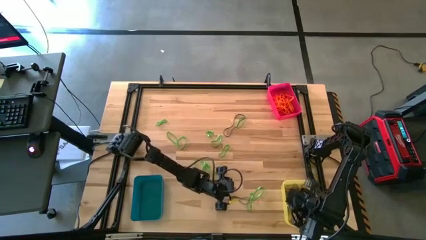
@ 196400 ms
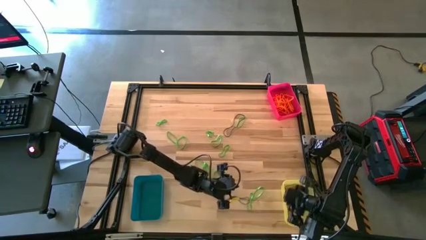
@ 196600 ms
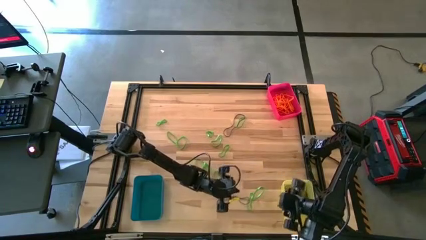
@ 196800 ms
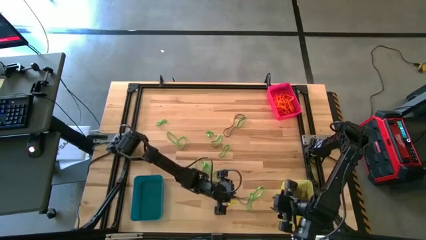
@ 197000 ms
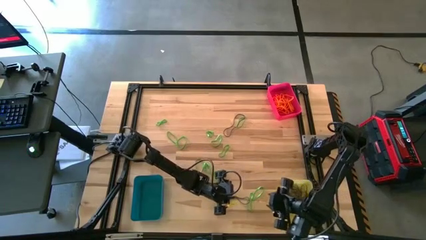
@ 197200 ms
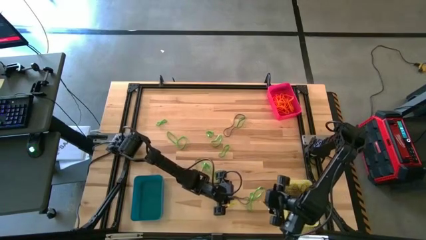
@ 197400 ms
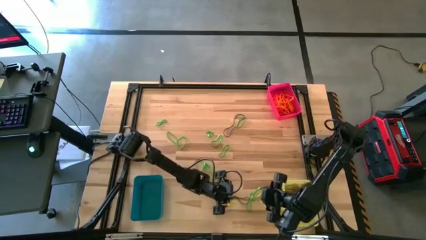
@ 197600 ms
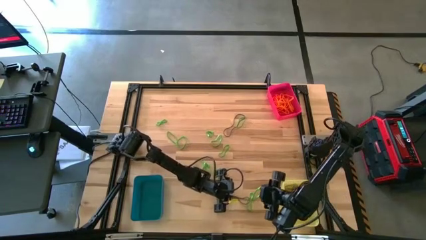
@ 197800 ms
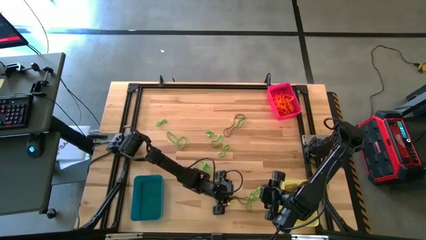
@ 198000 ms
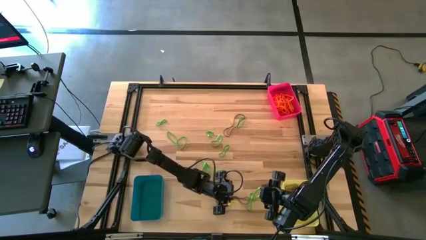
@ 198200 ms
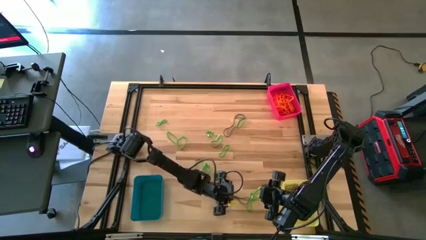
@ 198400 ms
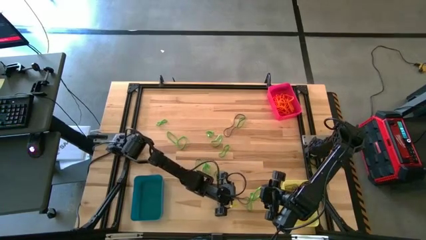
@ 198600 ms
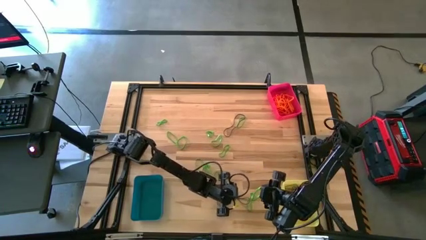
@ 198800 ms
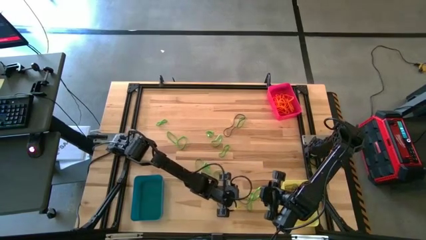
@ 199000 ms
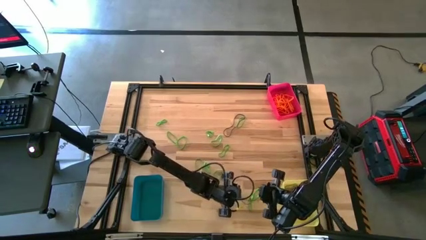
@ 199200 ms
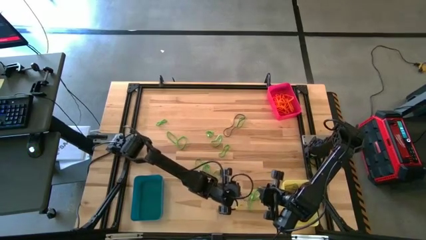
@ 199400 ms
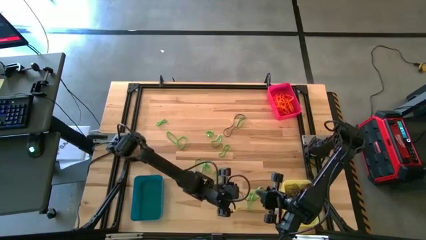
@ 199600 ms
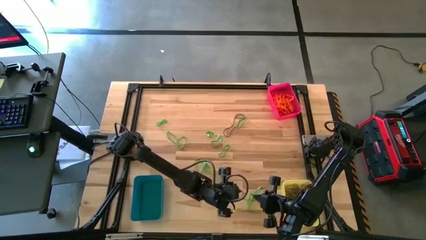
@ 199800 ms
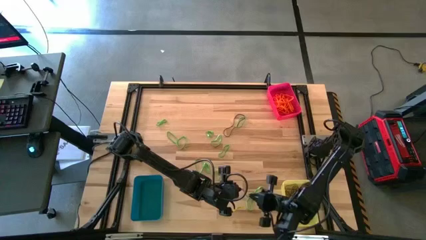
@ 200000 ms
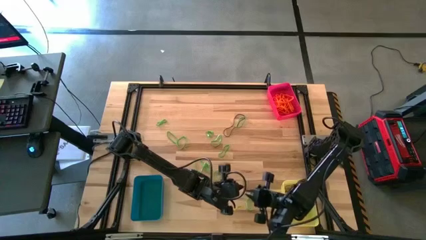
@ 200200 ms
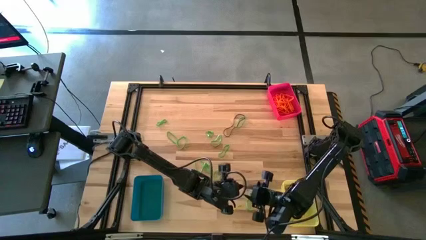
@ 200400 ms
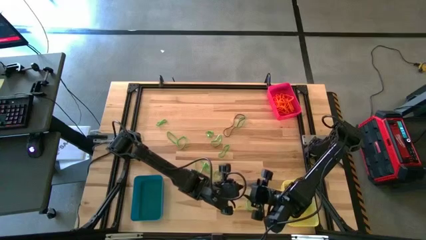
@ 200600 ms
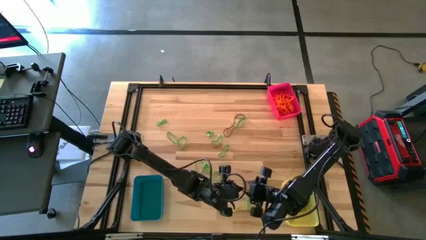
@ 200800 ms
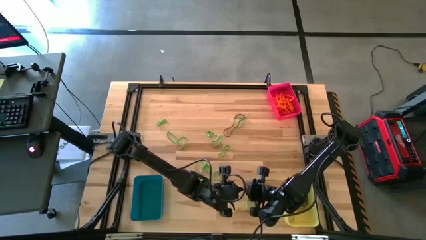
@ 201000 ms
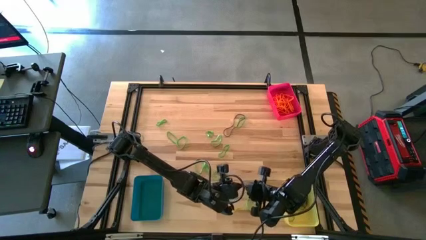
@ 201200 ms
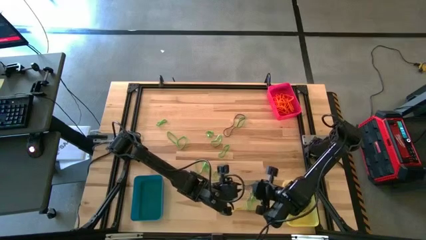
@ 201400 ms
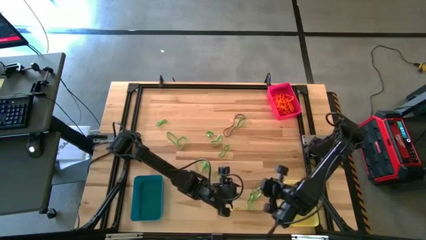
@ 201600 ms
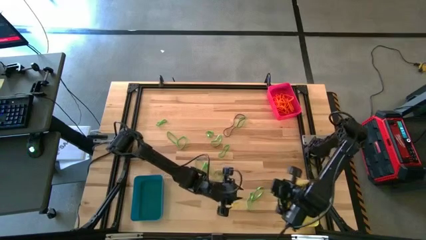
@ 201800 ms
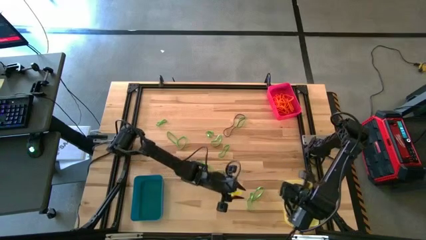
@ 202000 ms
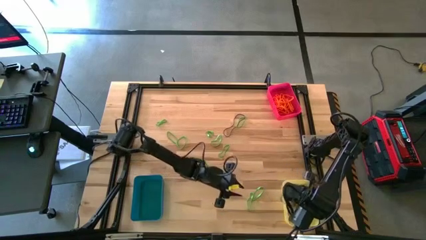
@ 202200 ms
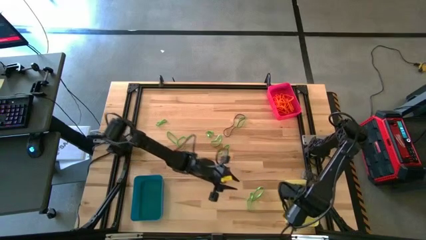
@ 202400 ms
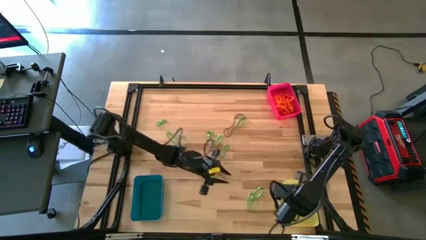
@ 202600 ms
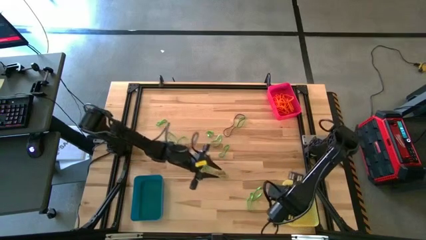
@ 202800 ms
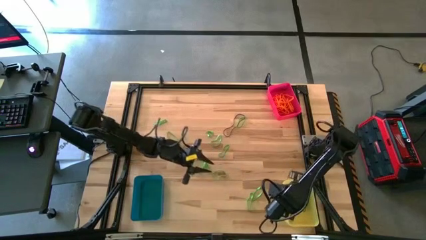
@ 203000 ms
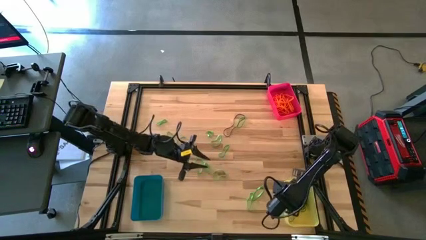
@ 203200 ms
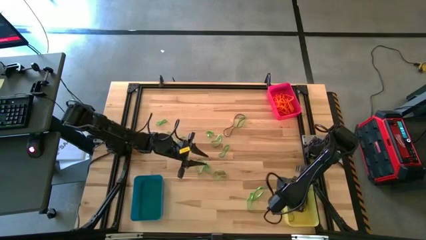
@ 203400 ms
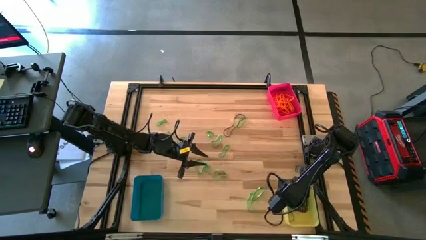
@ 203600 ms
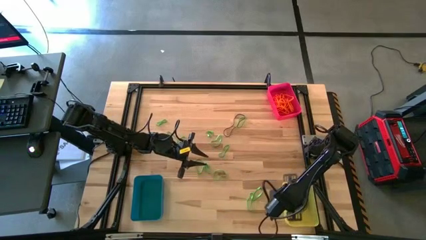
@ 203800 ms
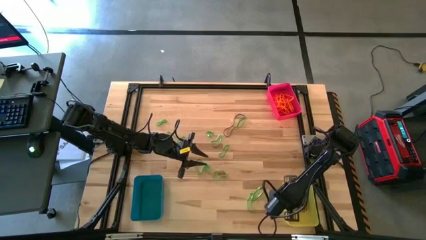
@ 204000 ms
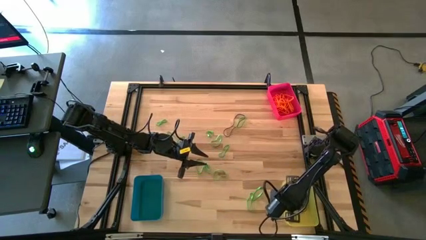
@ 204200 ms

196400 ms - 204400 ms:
Task: Sort rubber bands into baskets
Put the purple rubber band into the yellow bin

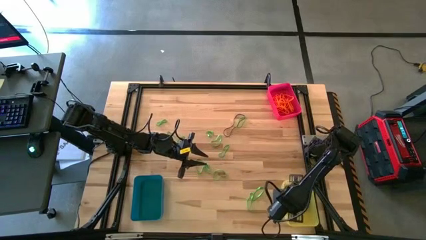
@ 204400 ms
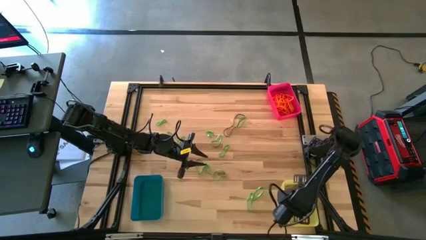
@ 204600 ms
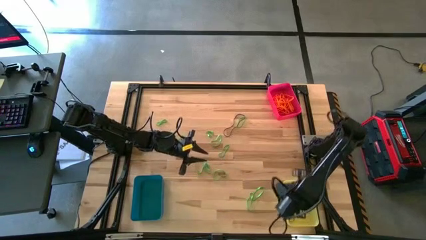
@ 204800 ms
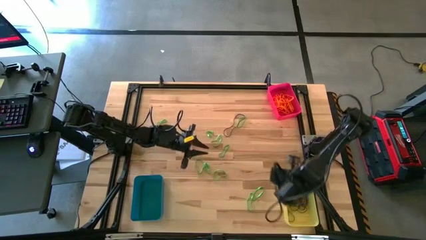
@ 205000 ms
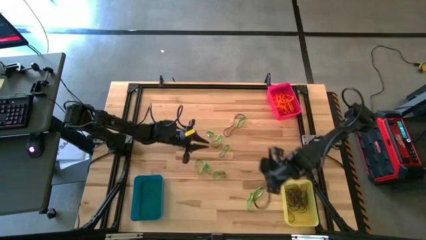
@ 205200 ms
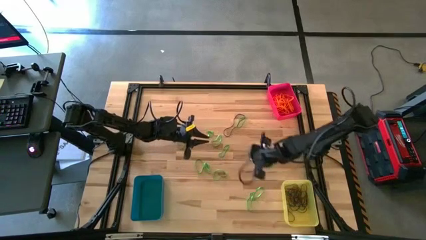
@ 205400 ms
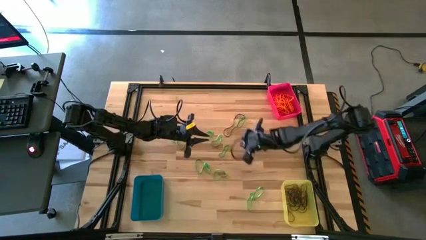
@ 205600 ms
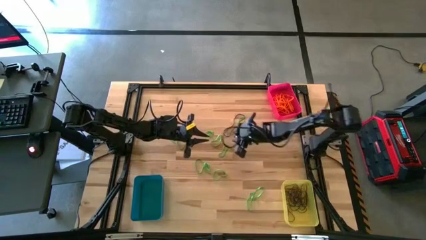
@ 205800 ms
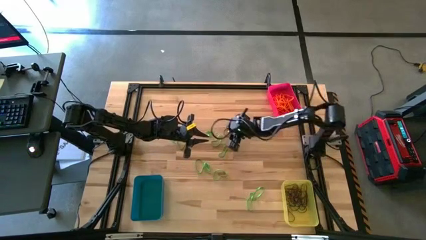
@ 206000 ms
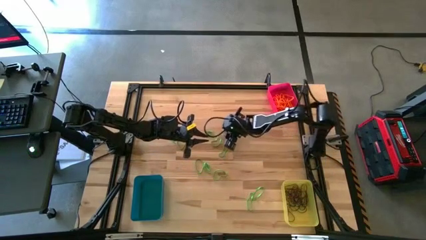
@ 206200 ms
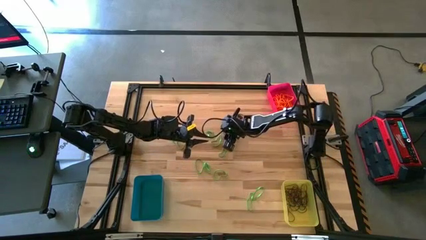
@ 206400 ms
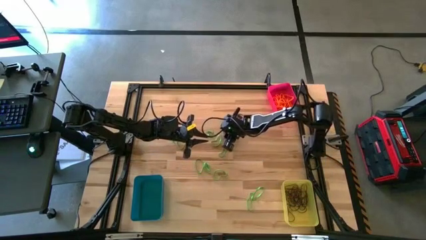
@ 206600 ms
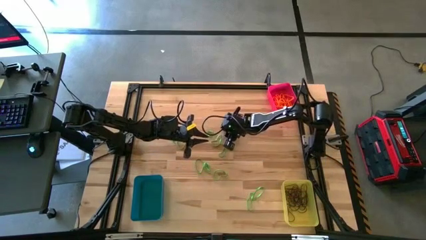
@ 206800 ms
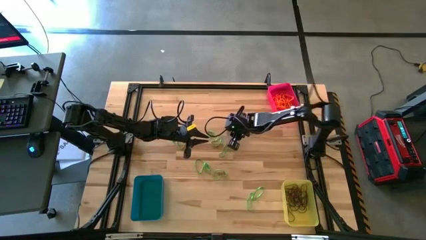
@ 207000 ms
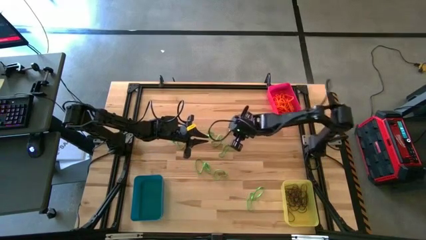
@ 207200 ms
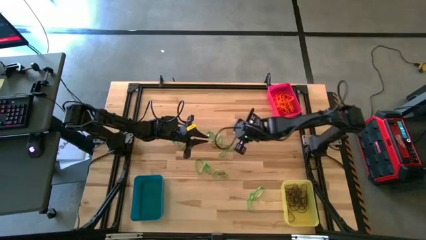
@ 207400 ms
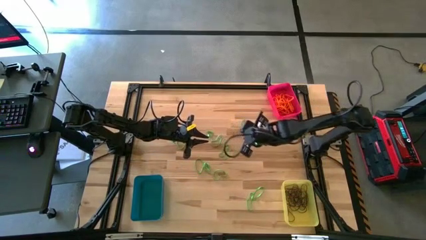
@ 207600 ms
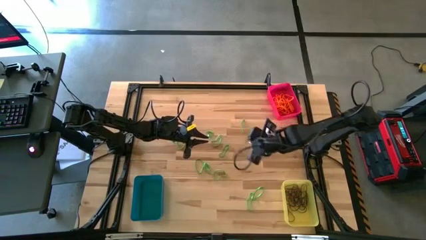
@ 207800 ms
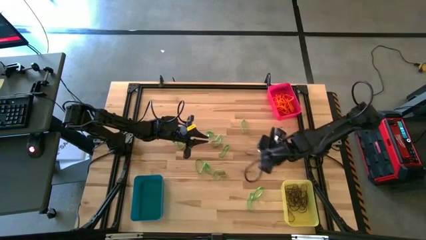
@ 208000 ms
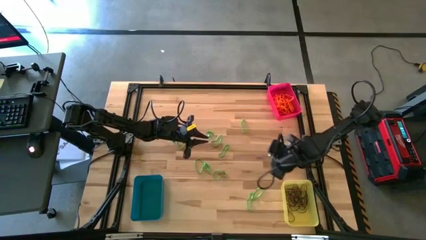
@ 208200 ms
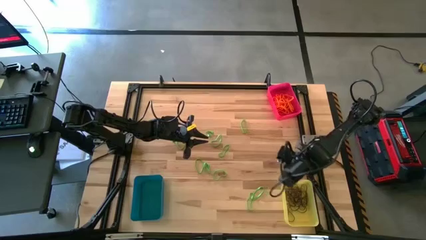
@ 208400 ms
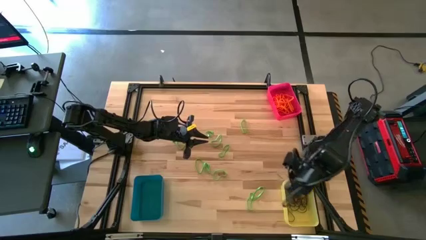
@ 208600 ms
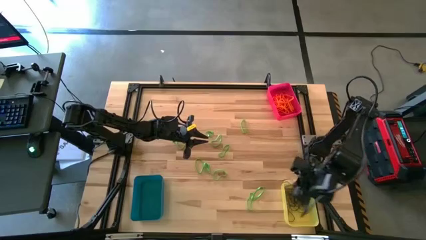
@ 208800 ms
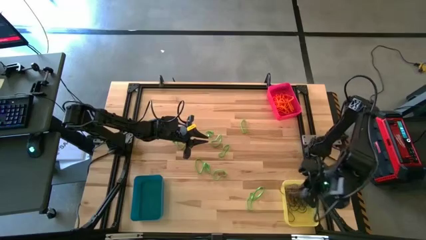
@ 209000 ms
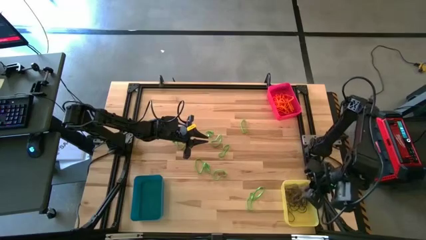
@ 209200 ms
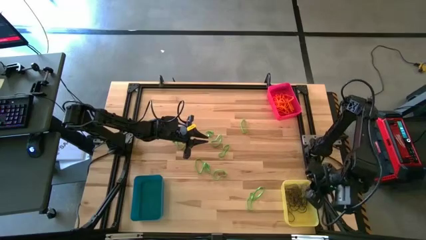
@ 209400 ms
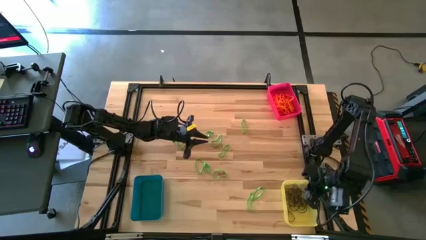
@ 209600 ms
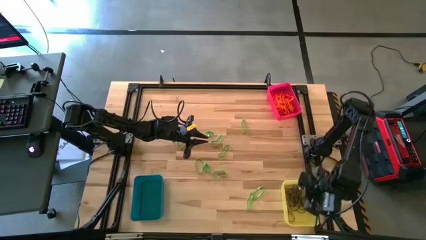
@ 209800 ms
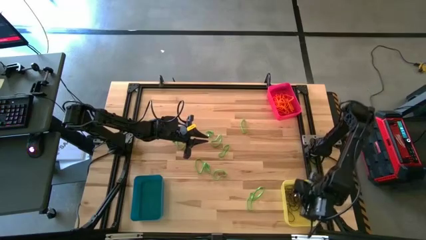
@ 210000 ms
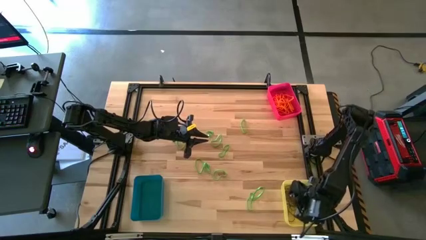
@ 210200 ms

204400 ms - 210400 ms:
Put the purple rubber band into the yellow bin

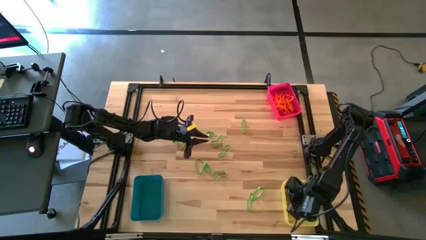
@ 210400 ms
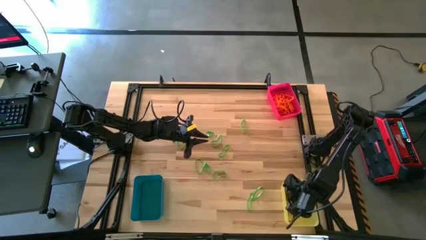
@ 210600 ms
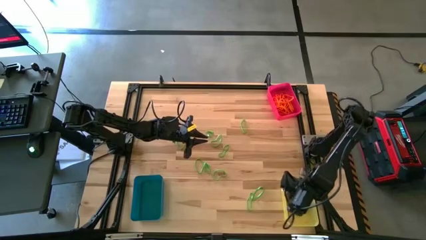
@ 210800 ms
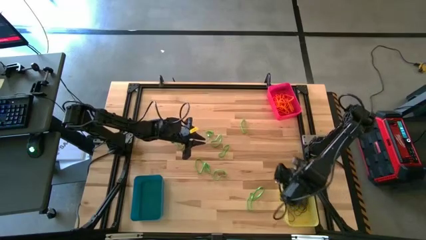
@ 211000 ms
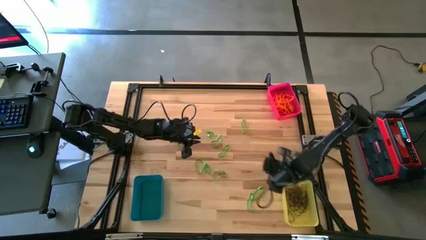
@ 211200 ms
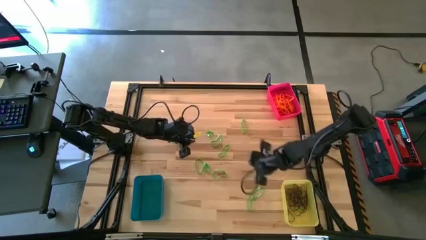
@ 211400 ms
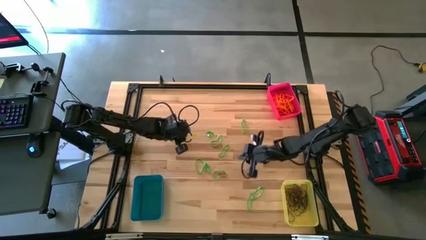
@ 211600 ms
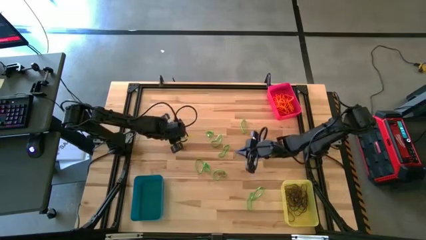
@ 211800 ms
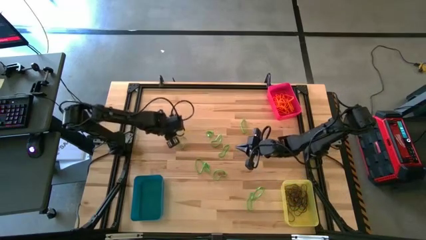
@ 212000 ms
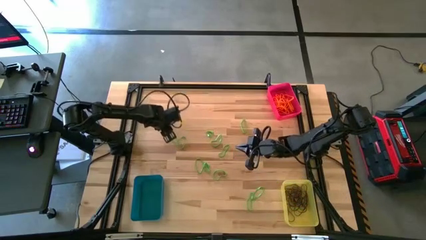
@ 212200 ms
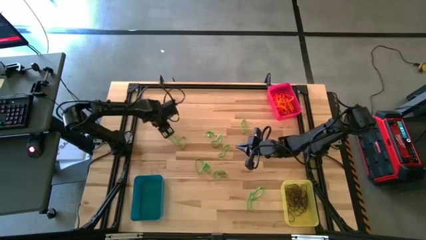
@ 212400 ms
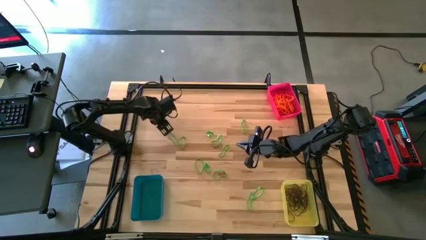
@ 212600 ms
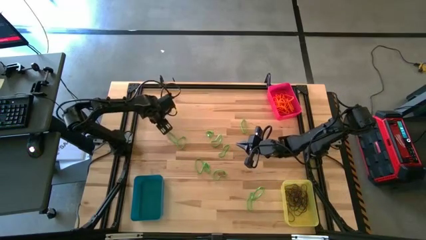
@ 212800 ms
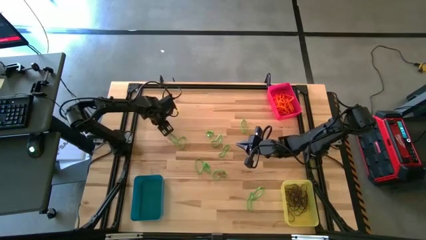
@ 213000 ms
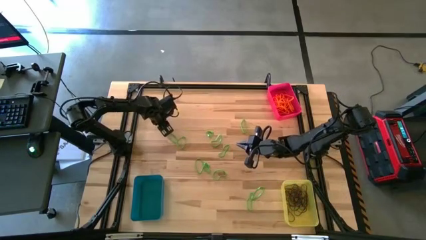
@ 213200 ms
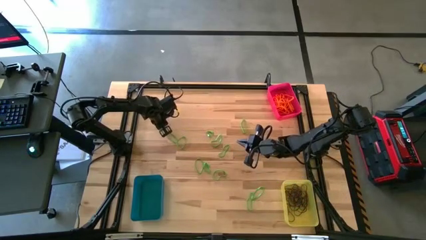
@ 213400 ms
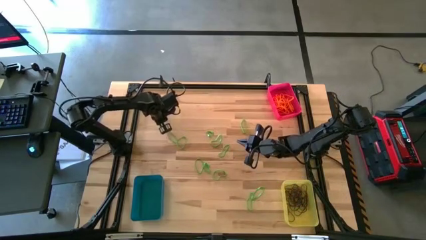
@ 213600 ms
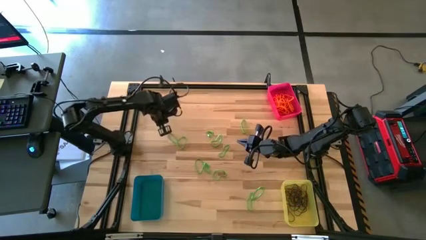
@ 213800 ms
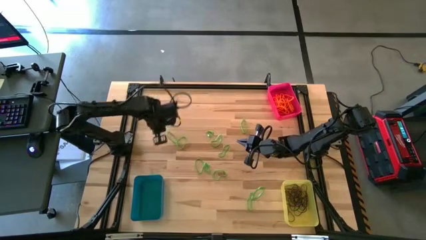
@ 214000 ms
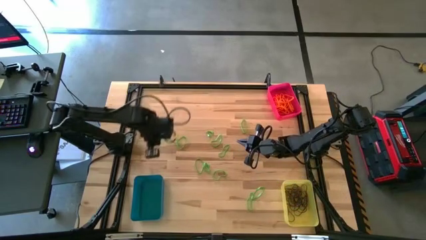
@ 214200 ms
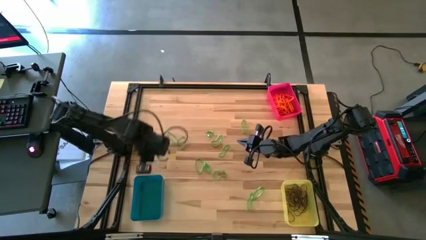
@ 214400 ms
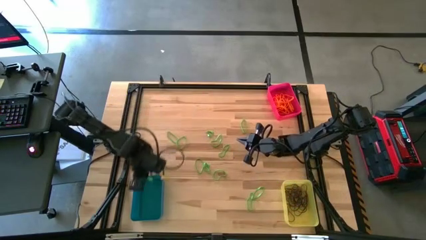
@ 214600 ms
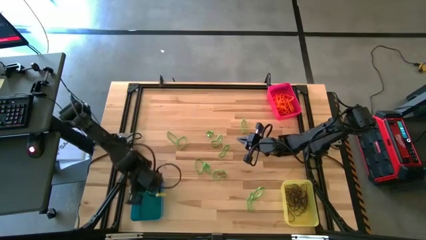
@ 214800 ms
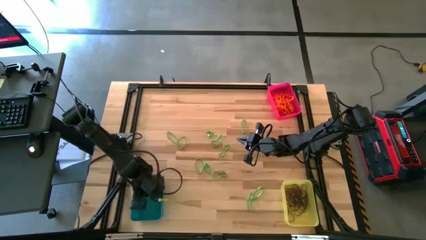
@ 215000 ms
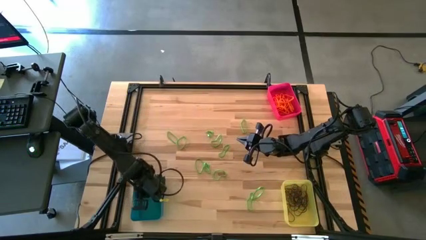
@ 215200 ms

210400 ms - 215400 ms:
Put the green rubber band into the blue bin
